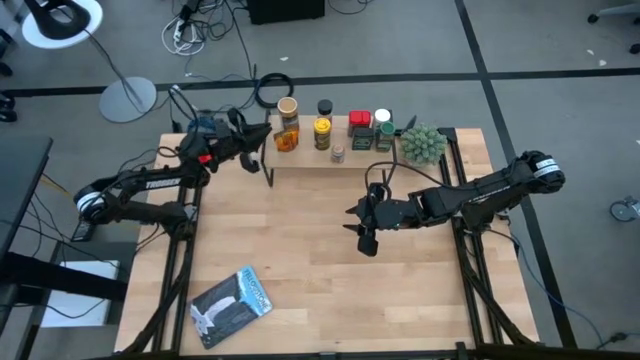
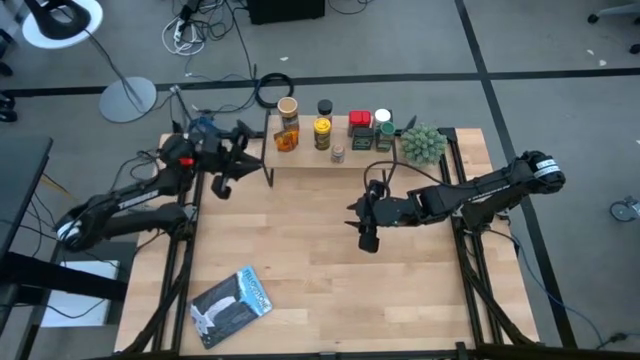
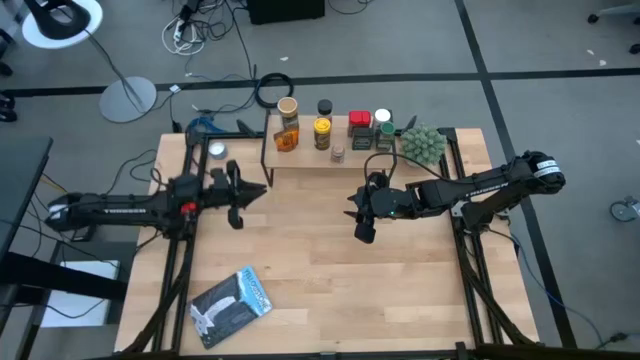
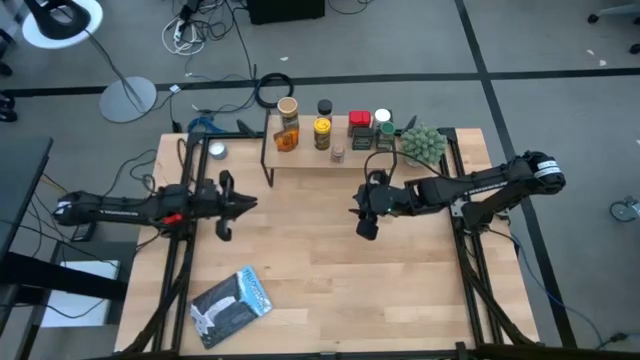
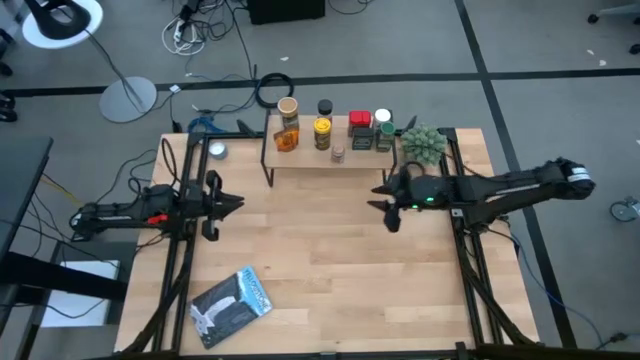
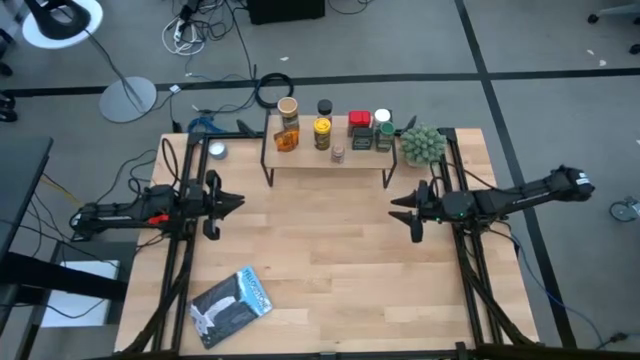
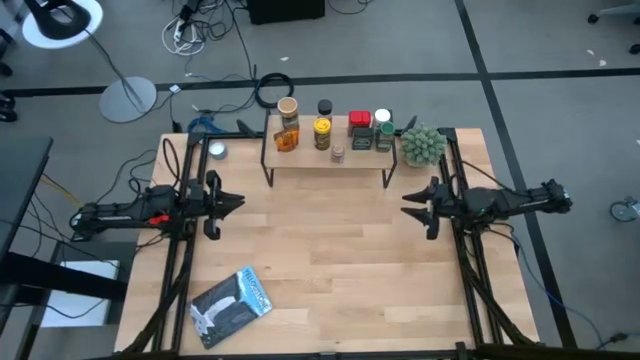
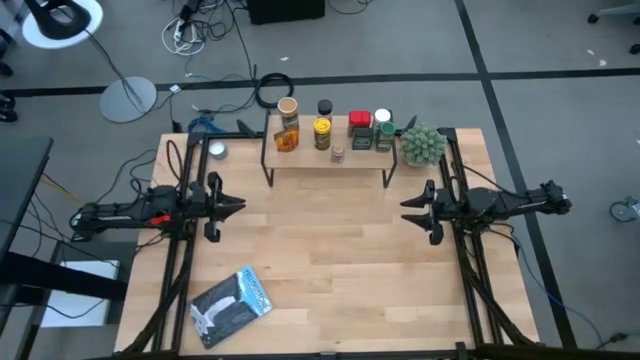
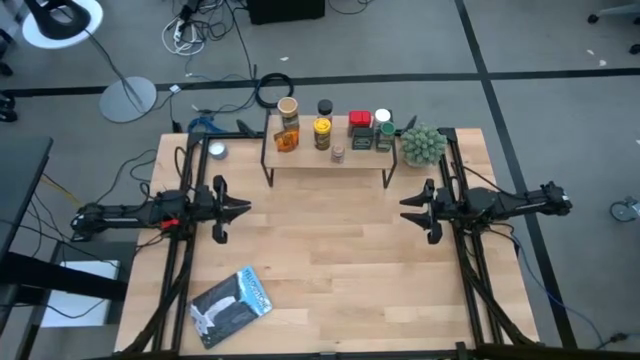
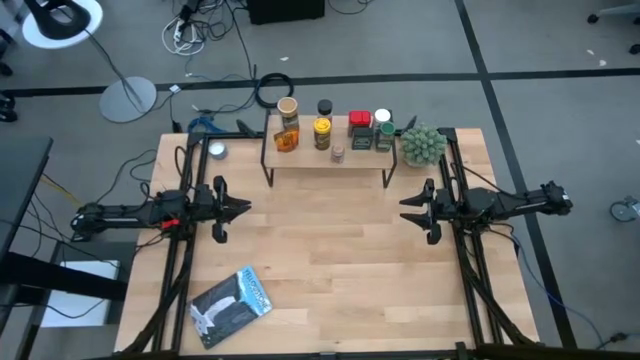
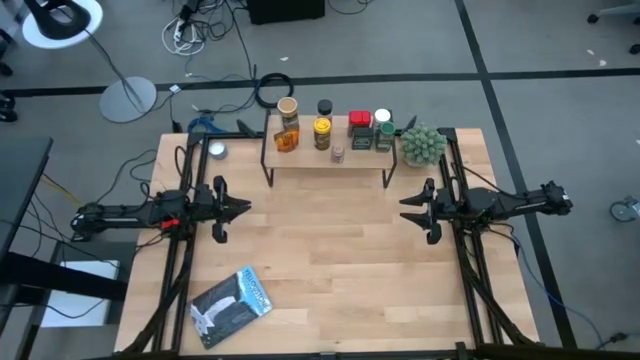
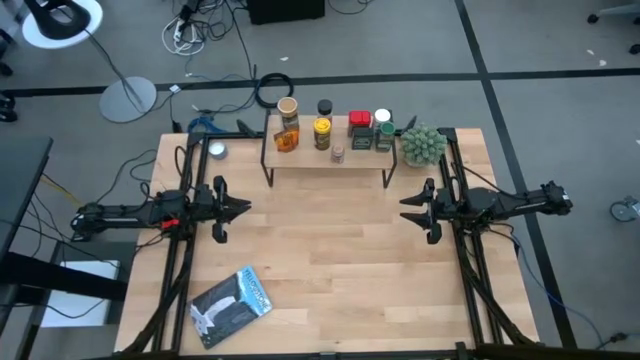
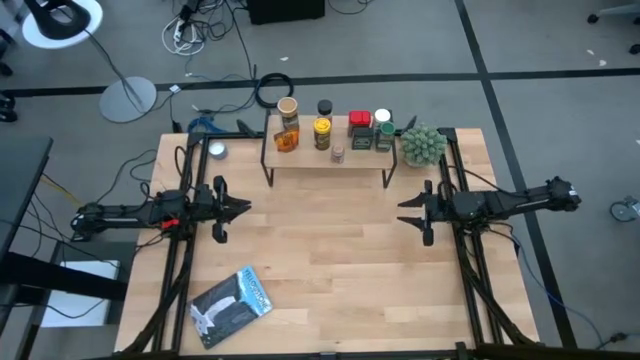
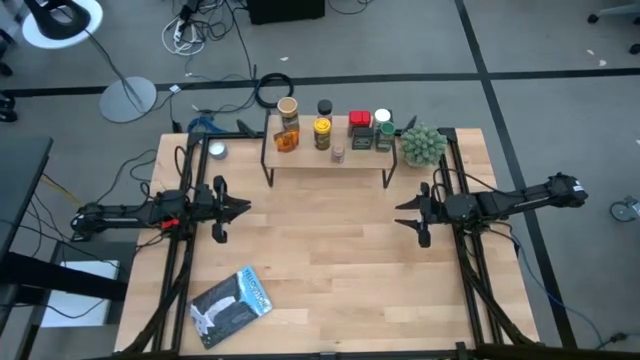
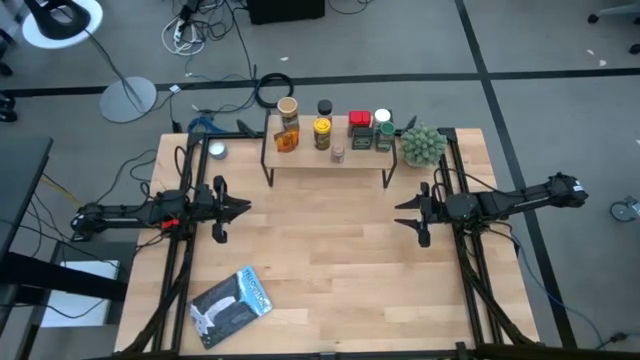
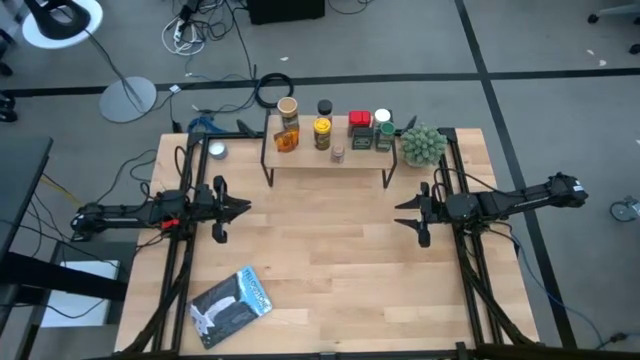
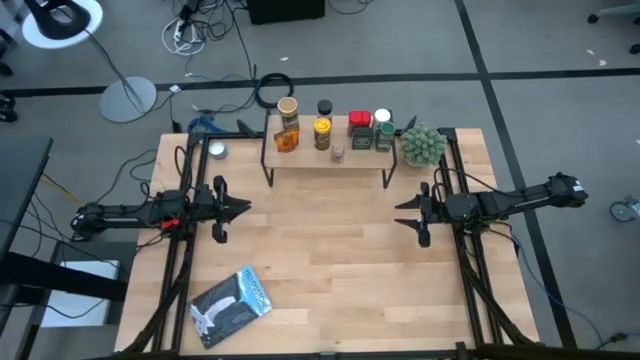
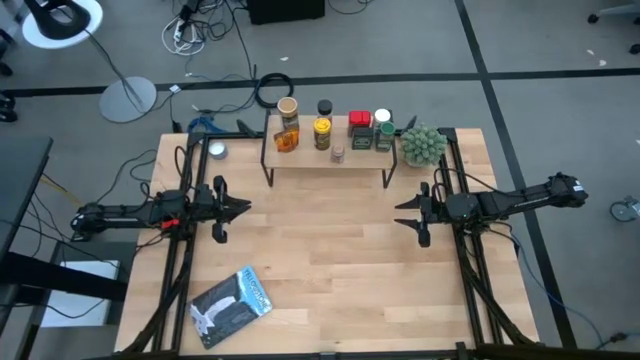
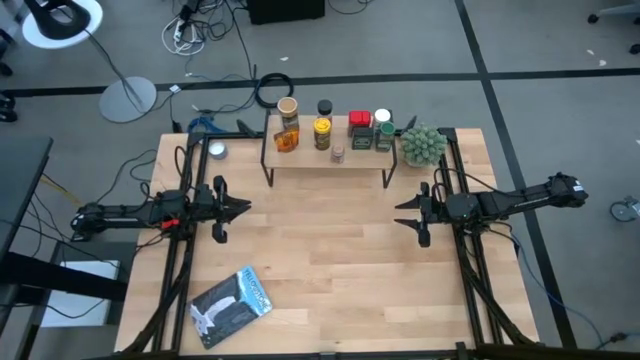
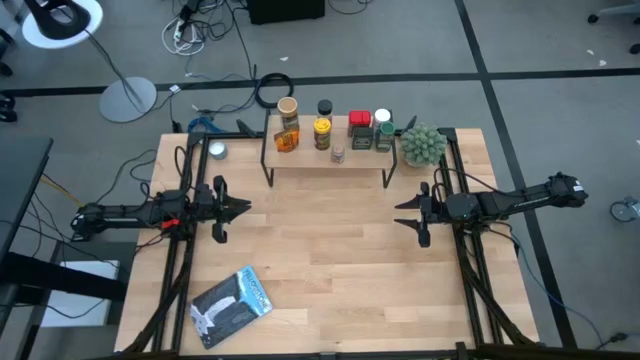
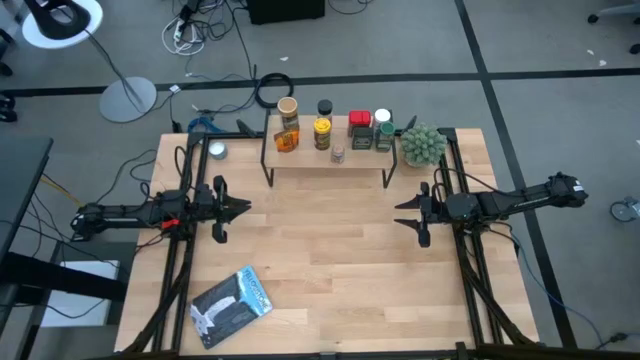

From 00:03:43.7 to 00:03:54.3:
Task: Shelf spices
Return to home position

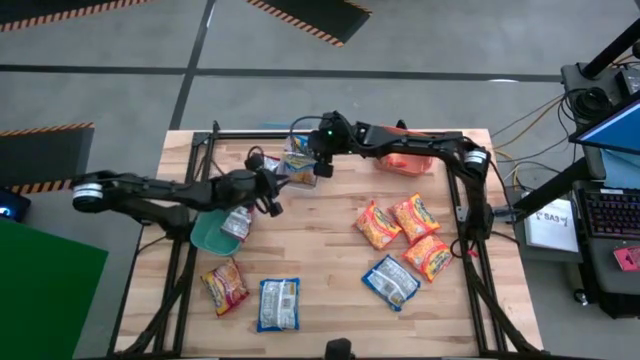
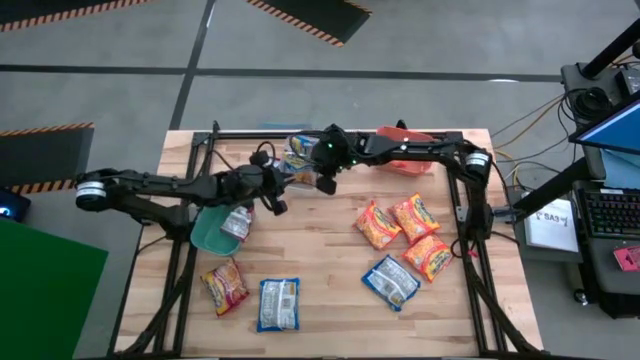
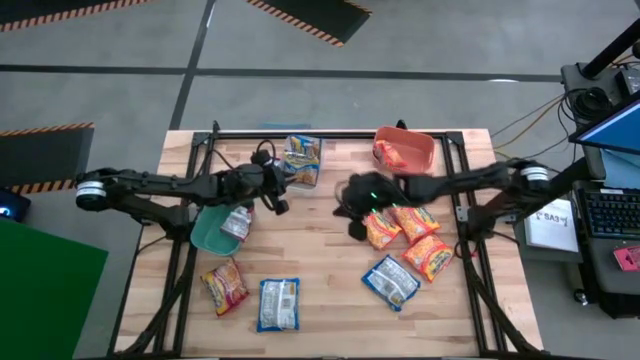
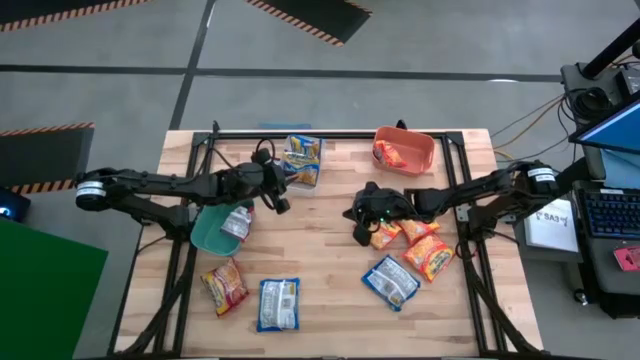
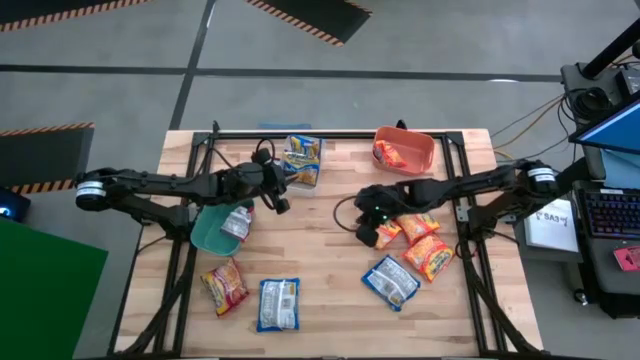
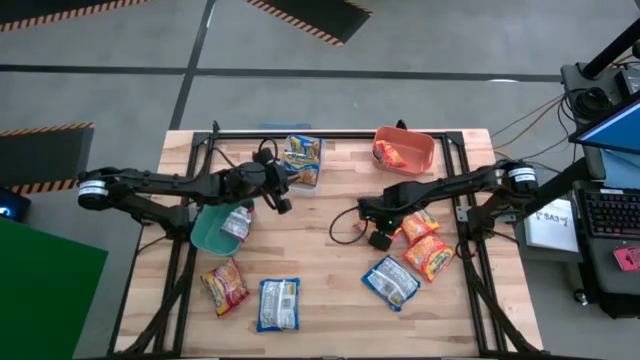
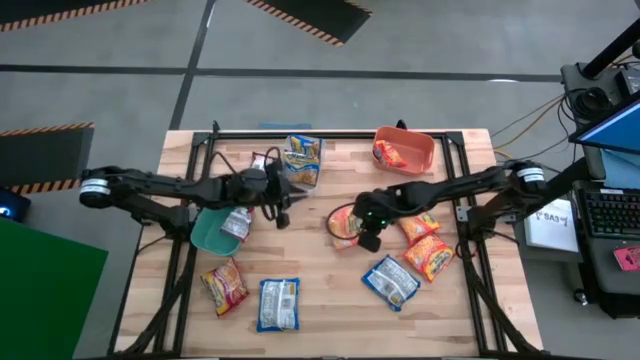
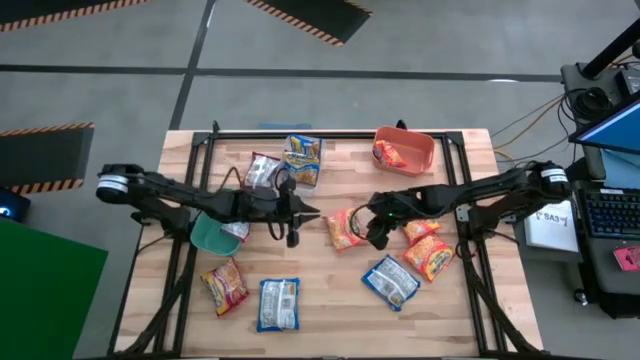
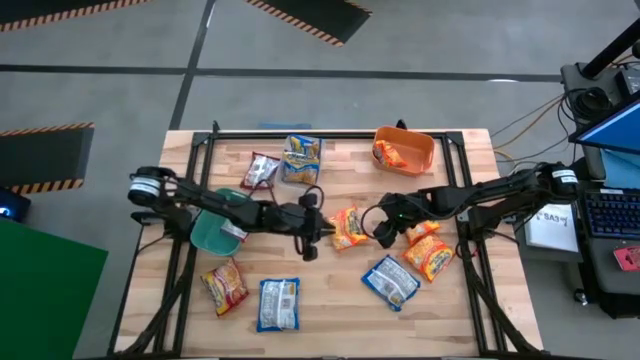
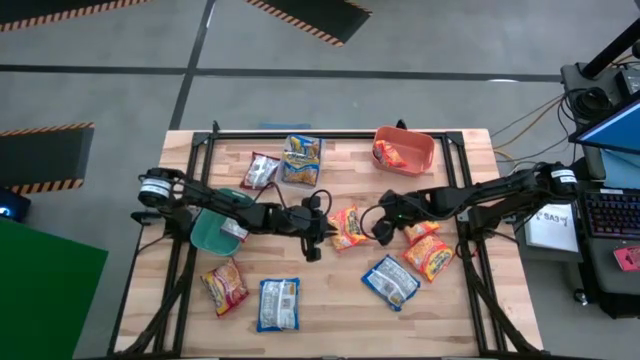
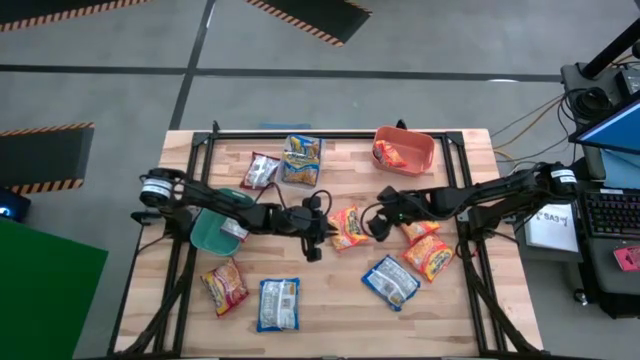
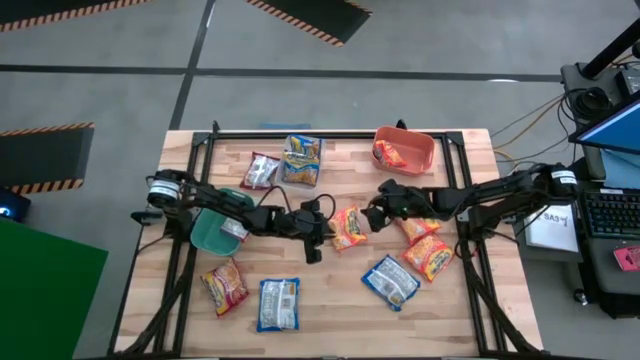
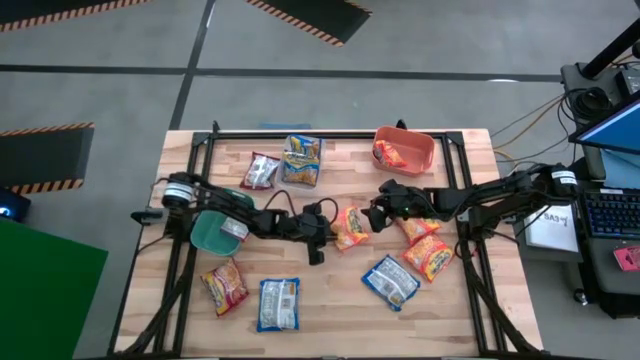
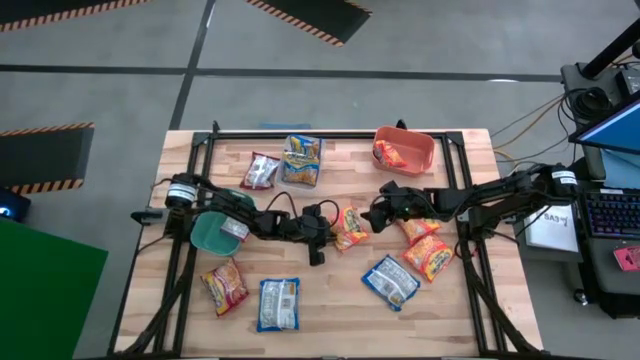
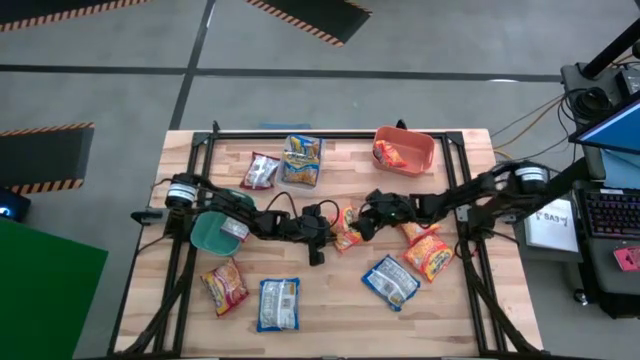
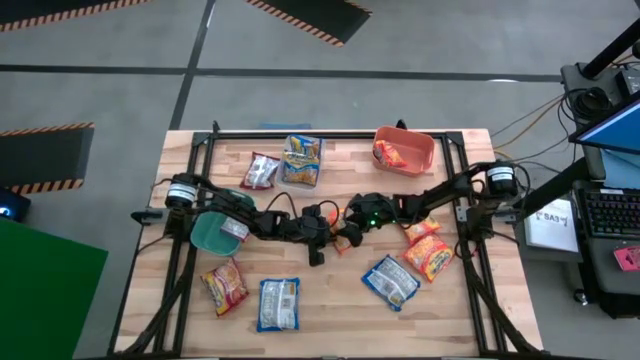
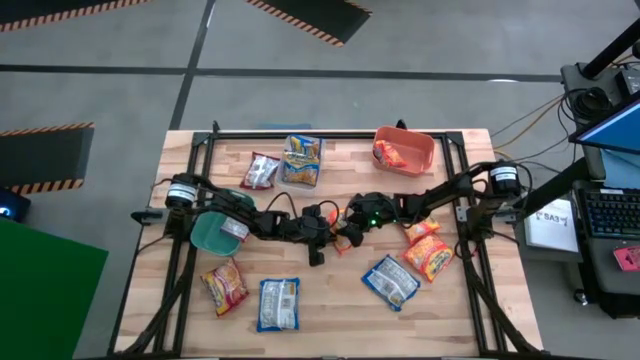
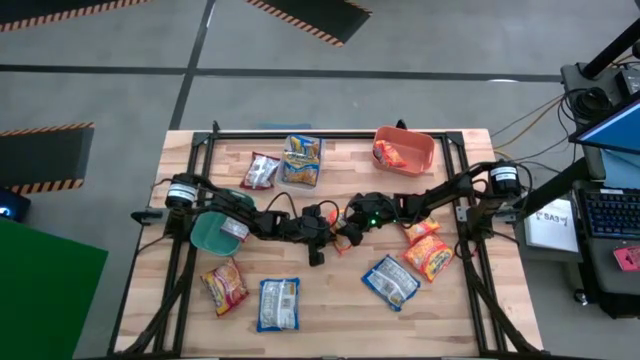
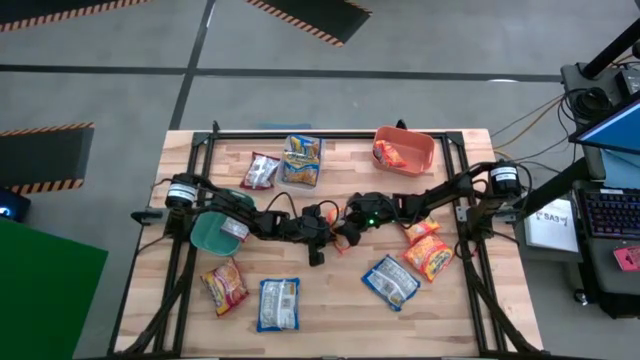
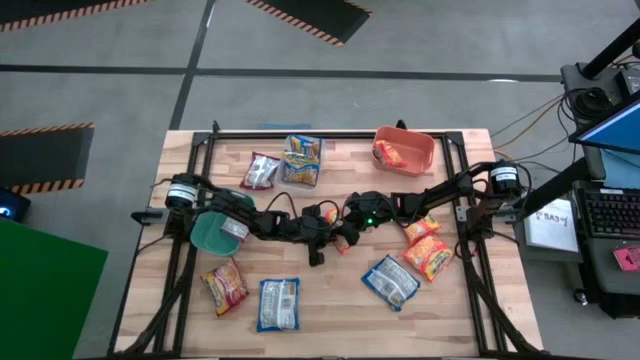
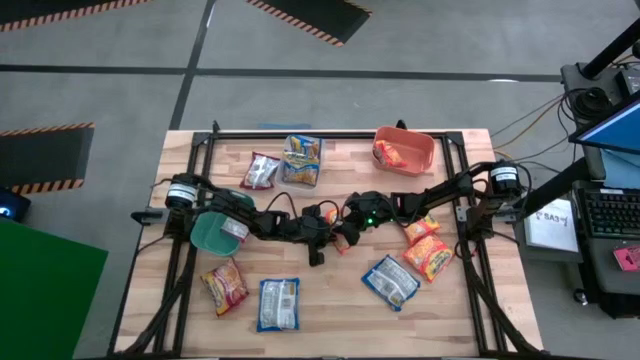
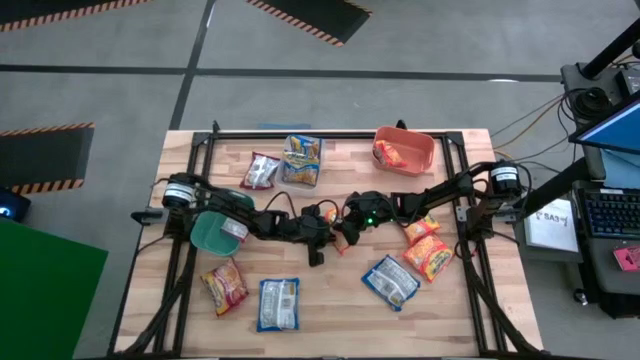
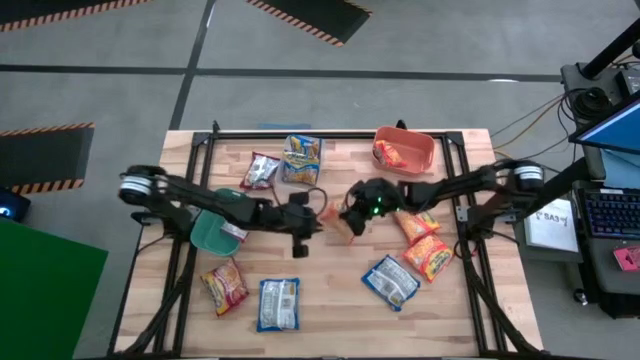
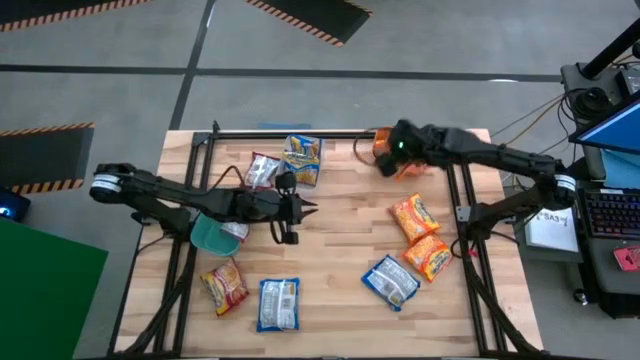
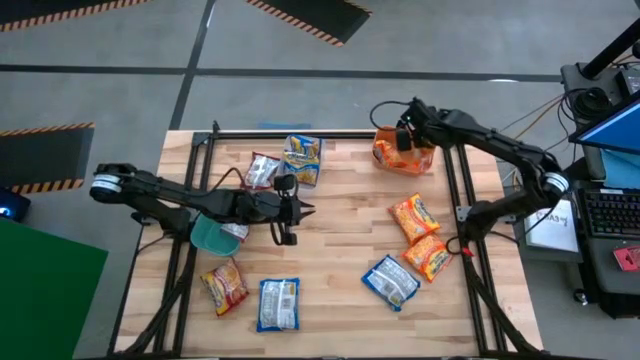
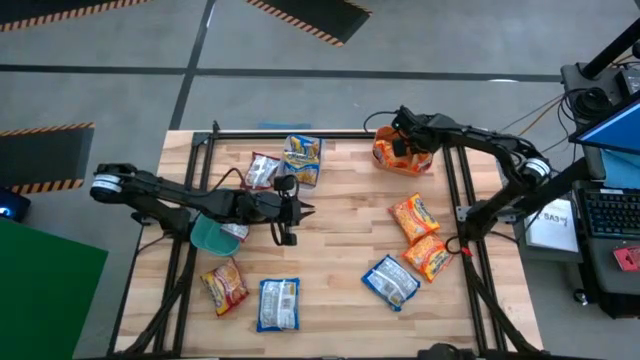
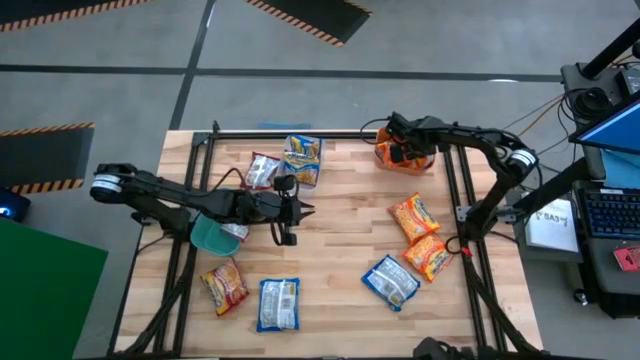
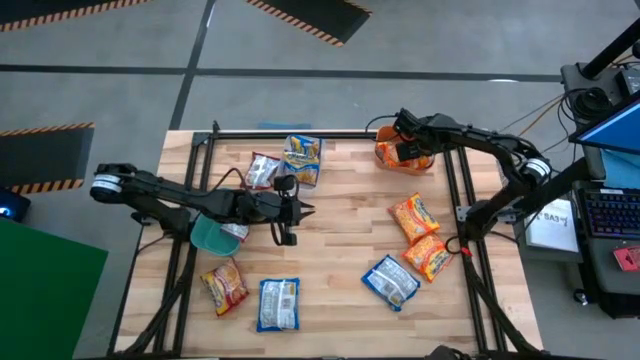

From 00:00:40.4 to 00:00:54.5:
Task: Sort Maruchan noodles
Put the orange noodle pack into the orange bin
